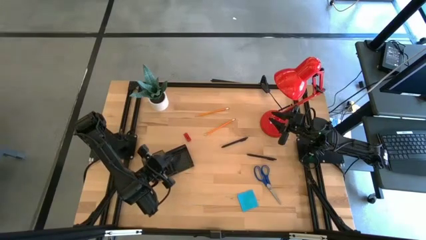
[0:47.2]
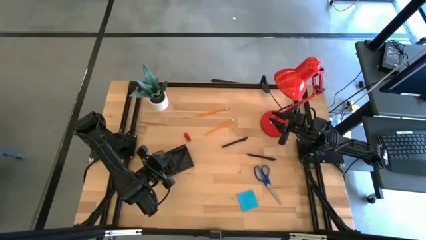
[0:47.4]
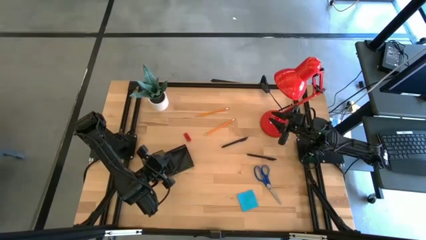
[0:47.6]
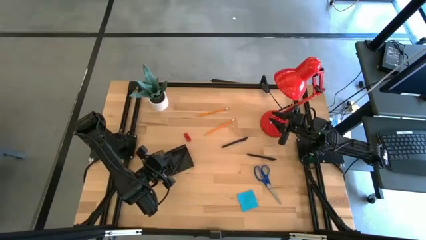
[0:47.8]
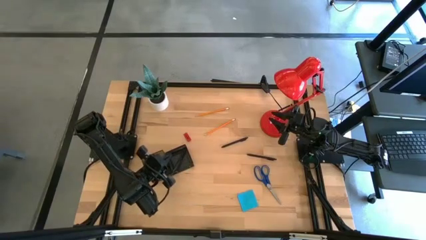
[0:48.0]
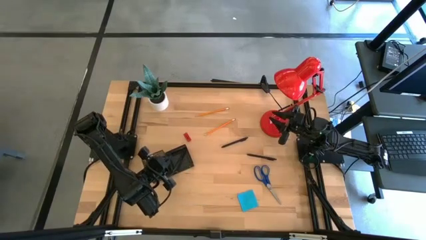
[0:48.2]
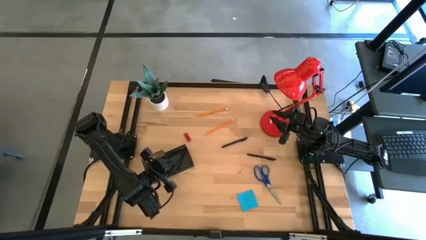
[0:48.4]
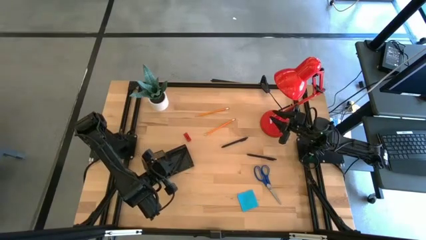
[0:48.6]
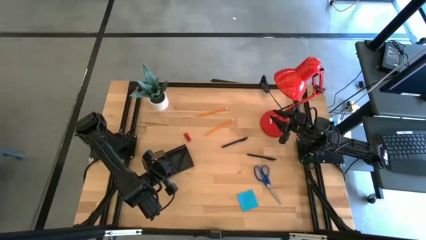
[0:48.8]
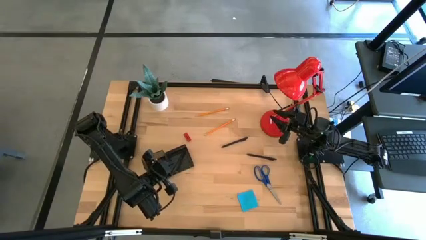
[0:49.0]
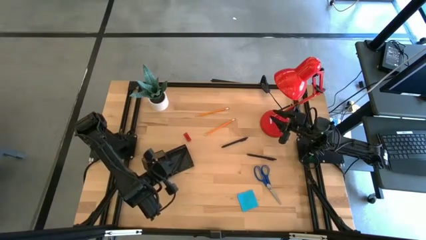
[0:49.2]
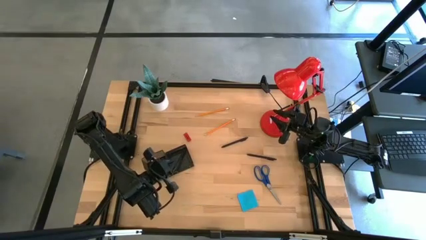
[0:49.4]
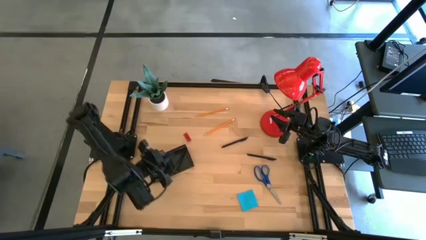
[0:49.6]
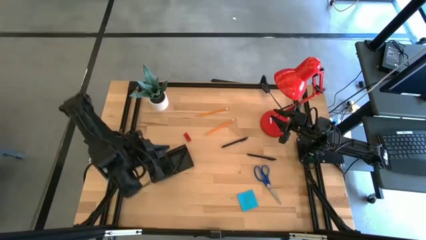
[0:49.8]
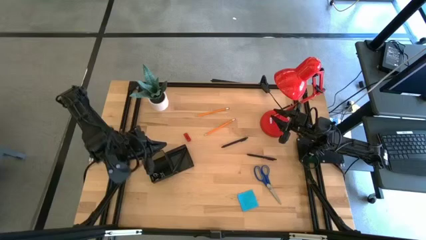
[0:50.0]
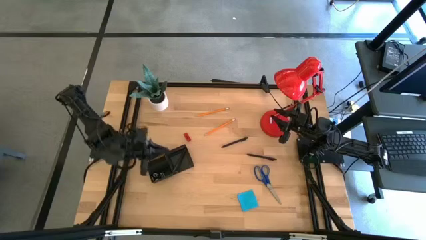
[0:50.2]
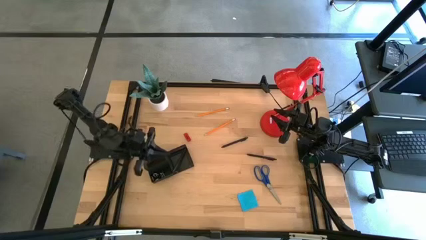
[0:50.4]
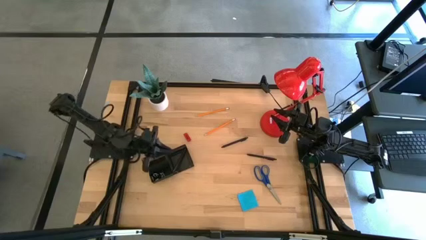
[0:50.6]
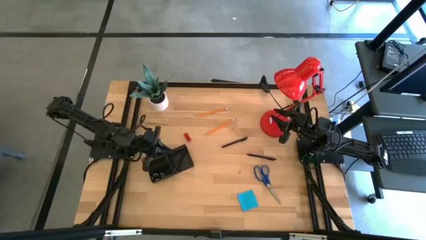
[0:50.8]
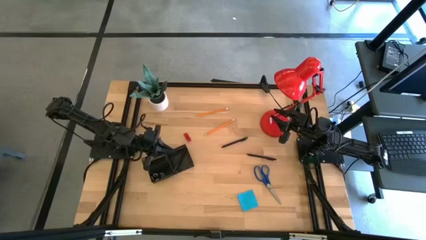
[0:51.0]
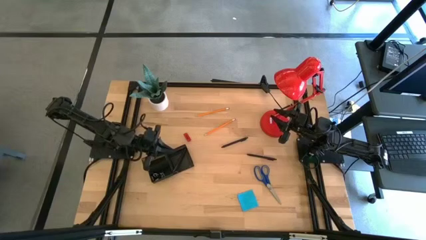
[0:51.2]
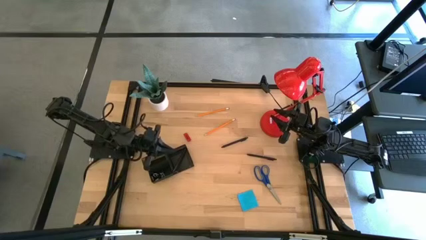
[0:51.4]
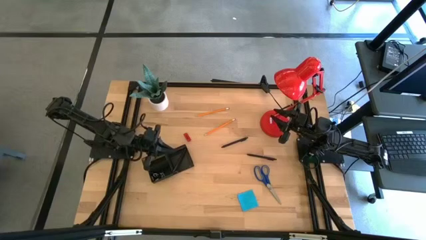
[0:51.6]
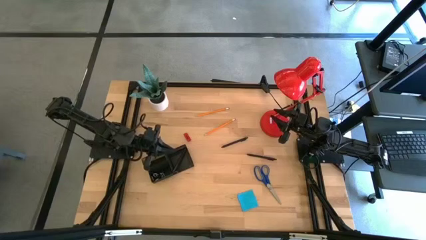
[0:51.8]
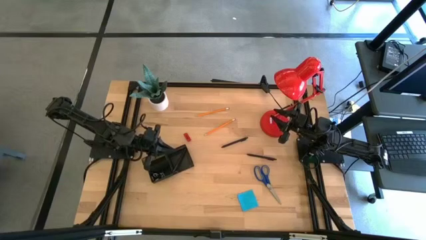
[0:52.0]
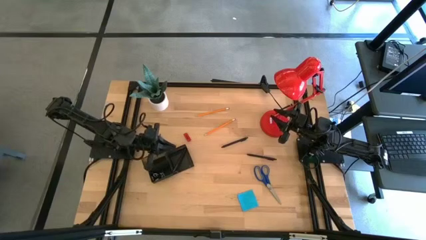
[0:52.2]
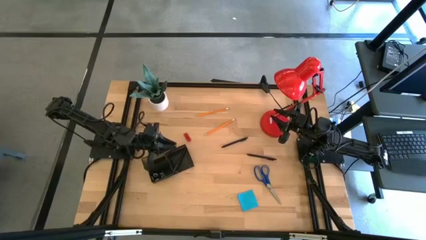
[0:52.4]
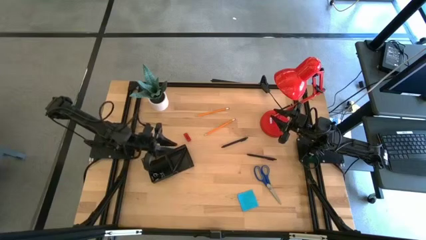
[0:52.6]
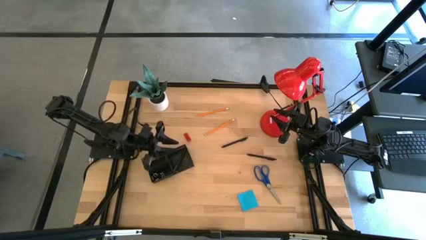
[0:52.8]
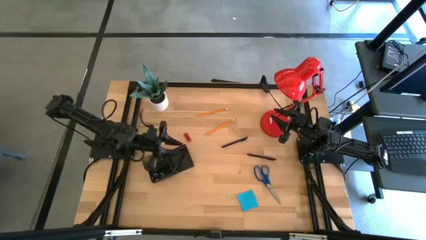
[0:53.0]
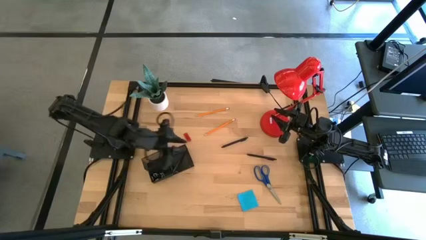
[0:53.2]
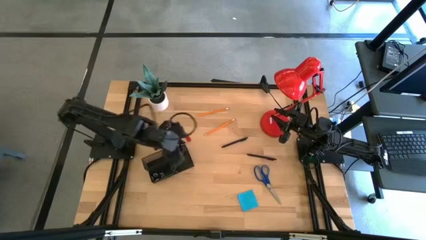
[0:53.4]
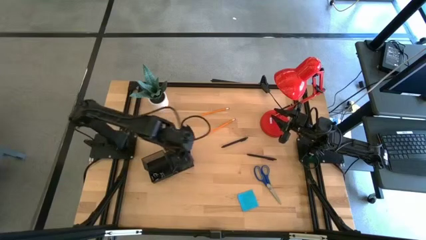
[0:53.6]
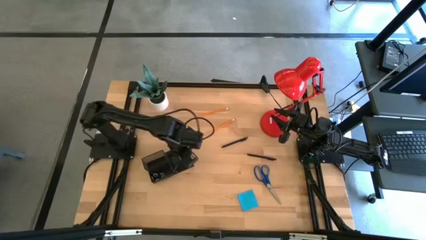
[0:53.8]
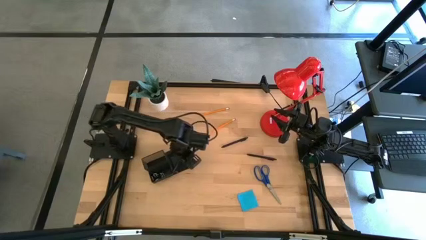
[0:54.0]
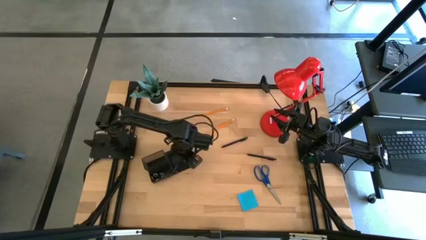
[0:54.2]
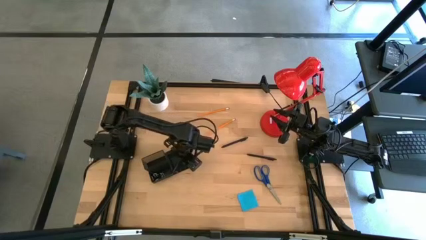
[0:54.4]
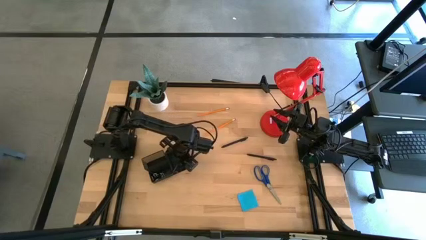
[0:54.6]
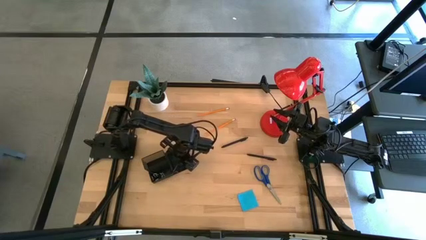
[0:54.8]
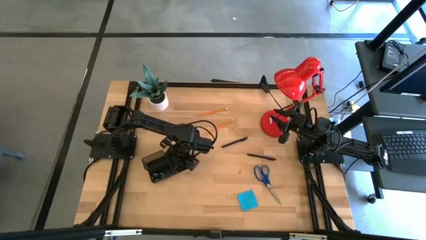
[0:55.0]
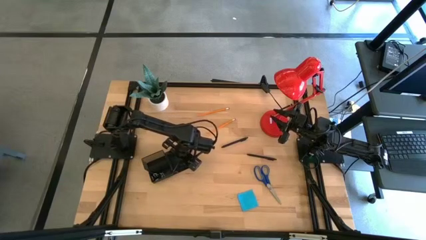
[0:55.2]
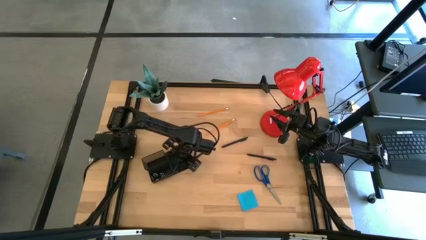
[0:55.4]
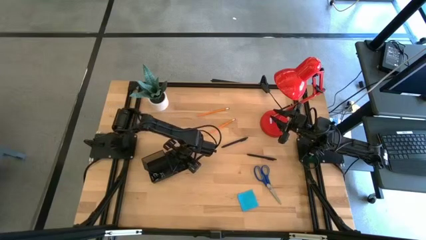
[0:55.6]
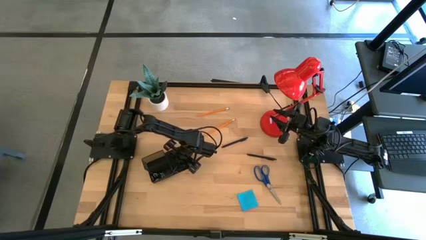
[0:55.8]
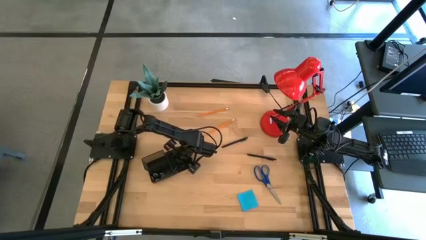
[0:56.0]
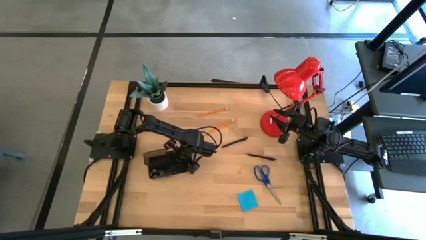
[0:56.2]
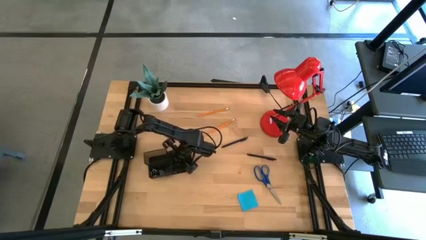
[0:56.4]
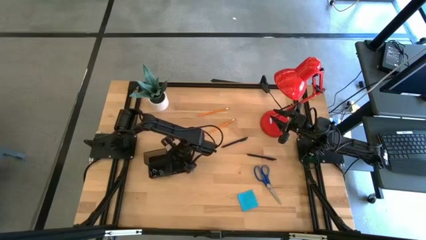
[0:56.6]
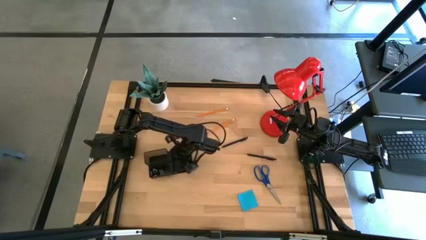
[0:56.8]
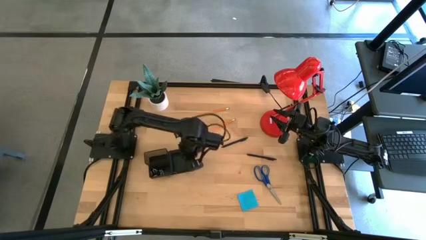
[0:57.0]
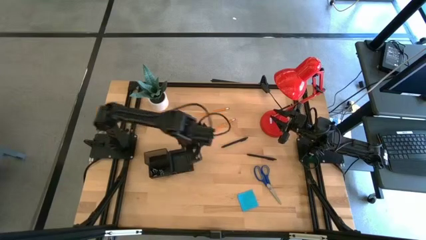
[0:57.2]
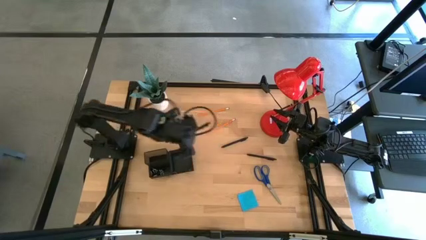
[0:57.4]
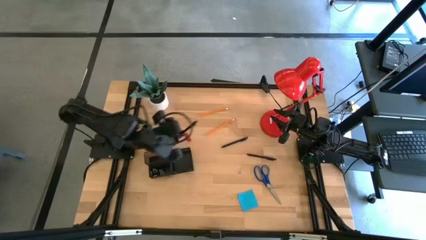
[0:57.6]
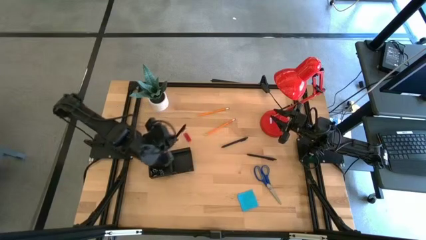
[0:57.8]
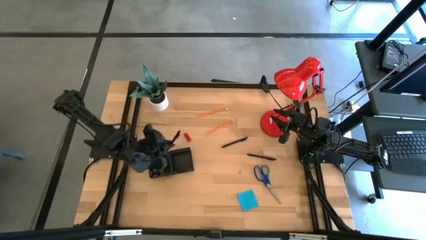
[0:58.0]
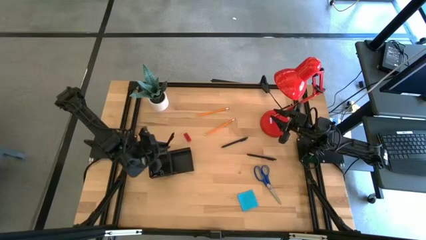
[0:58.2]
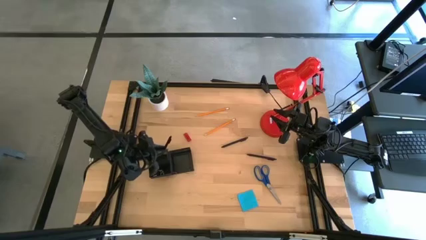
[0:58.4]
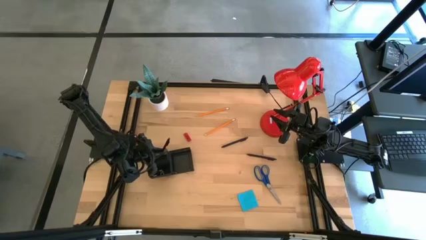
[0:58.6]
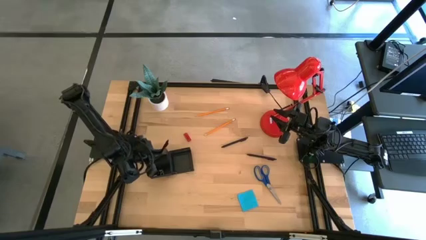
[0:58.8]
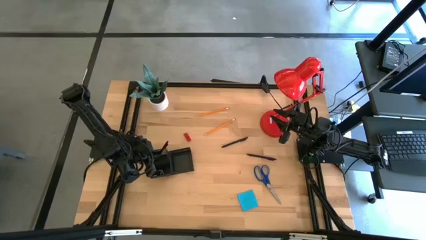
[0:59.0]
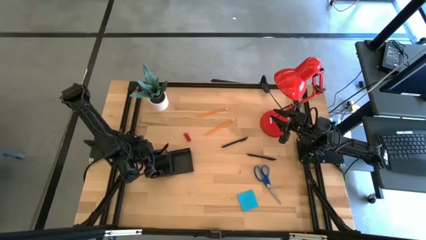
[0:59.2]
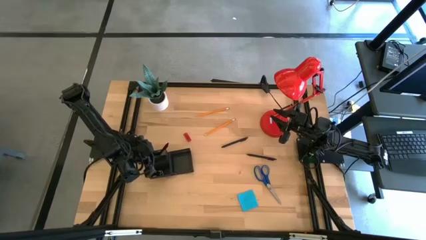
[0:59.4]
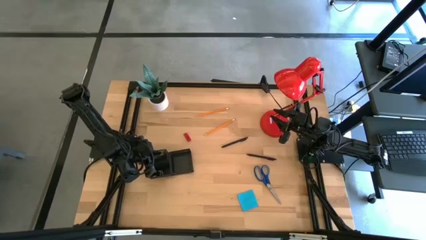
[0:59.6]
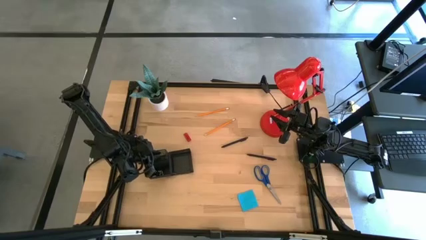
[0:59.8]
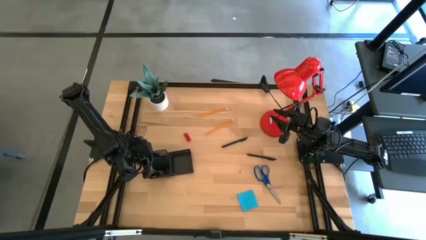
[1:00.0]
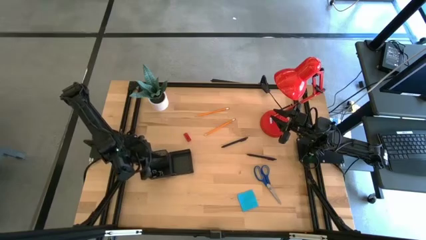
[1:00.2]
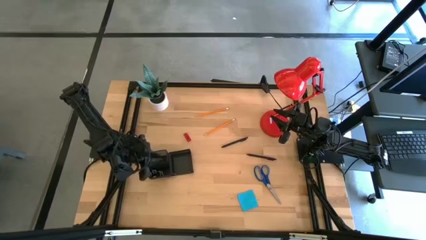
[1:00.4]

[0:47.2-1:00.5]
Task: Pick and place office supplies into organizer
Put the left black pen into the back left compartment of the desk organizer
